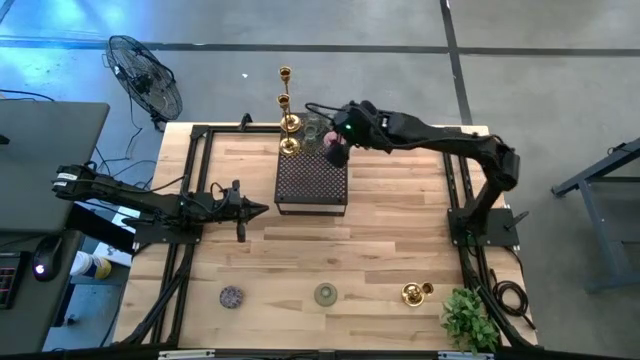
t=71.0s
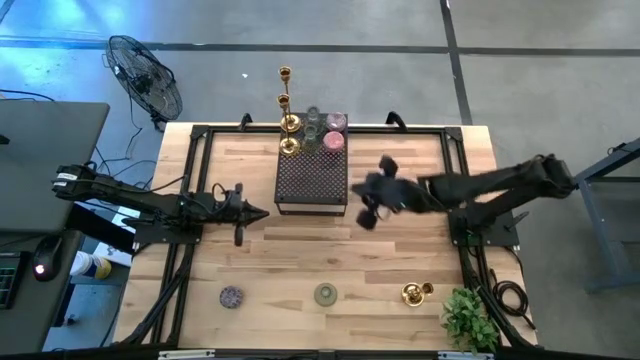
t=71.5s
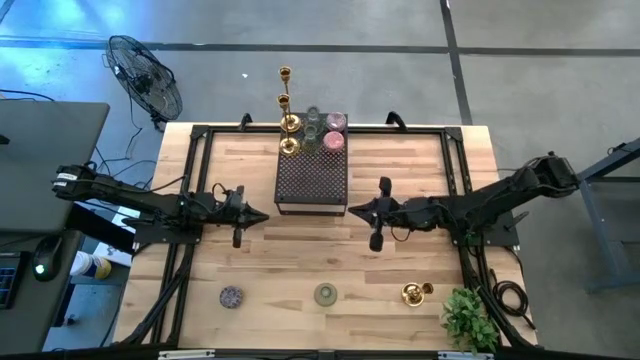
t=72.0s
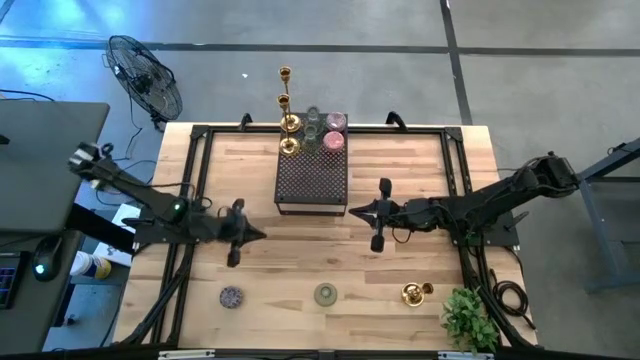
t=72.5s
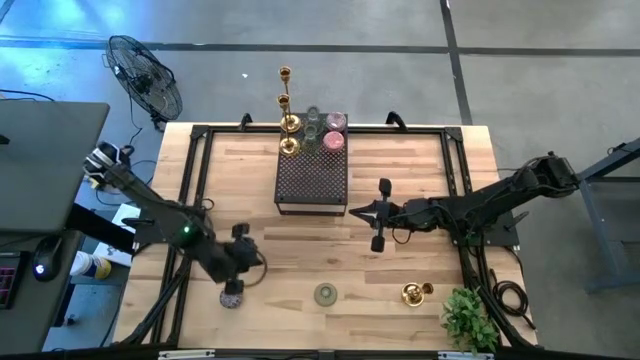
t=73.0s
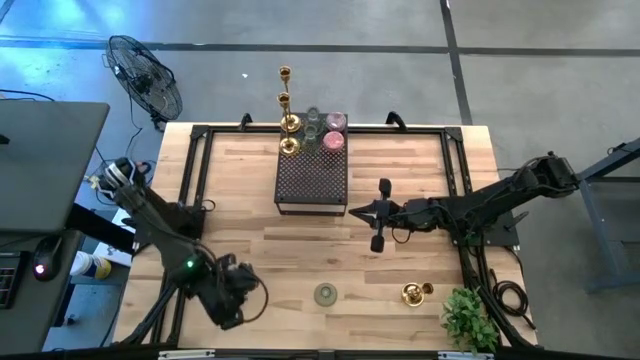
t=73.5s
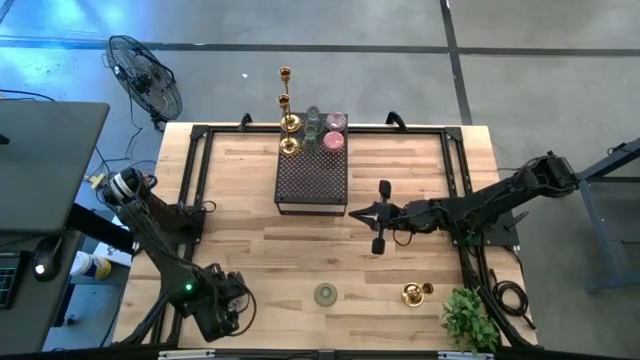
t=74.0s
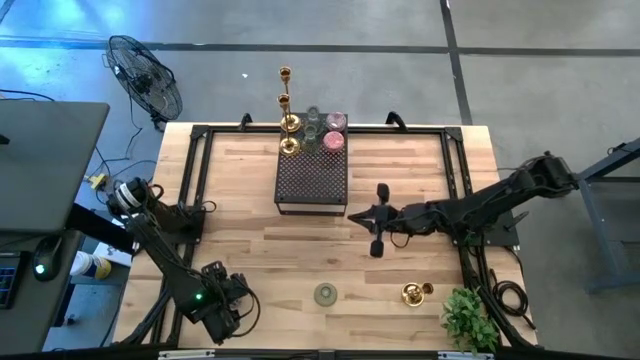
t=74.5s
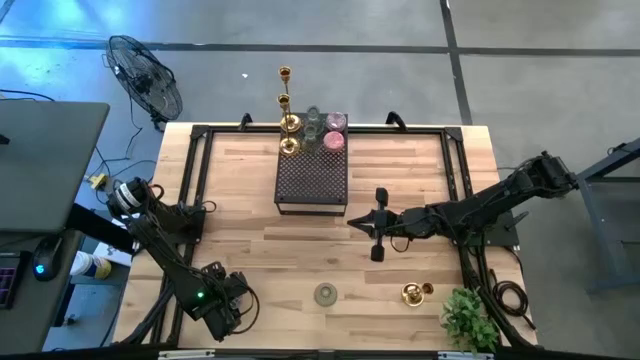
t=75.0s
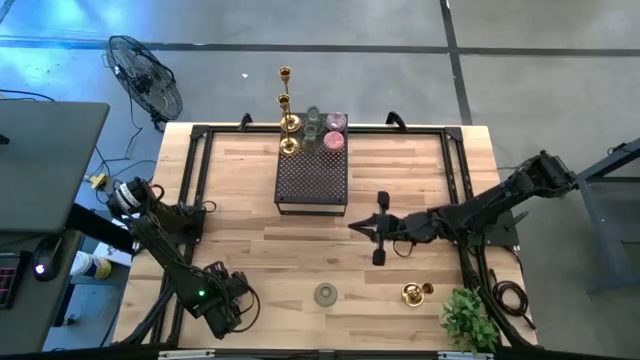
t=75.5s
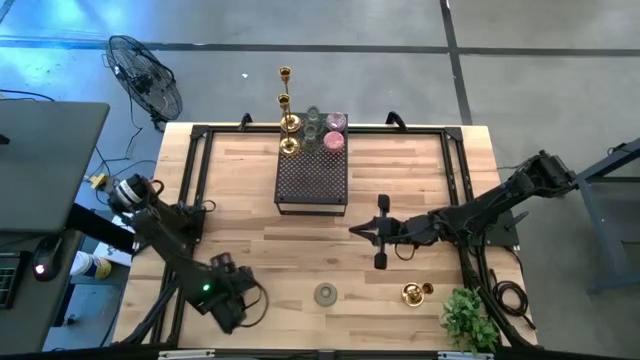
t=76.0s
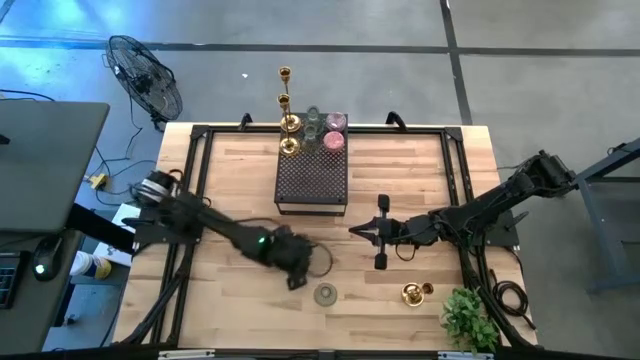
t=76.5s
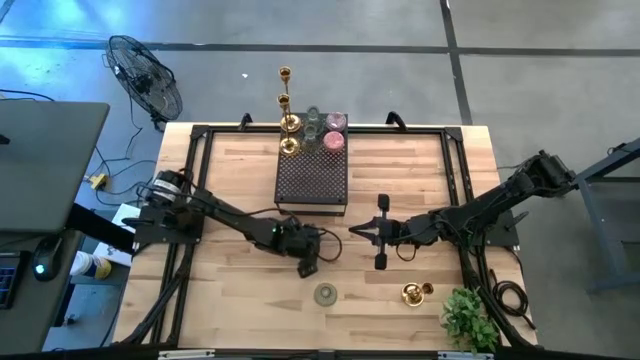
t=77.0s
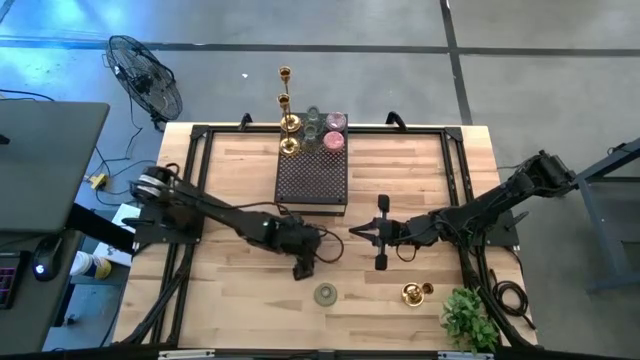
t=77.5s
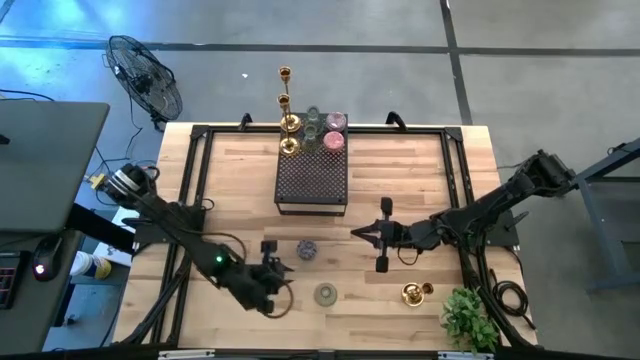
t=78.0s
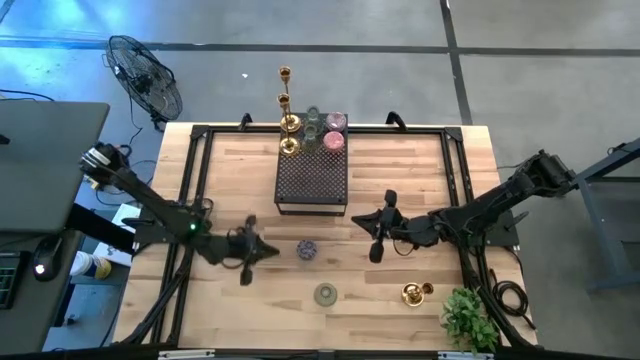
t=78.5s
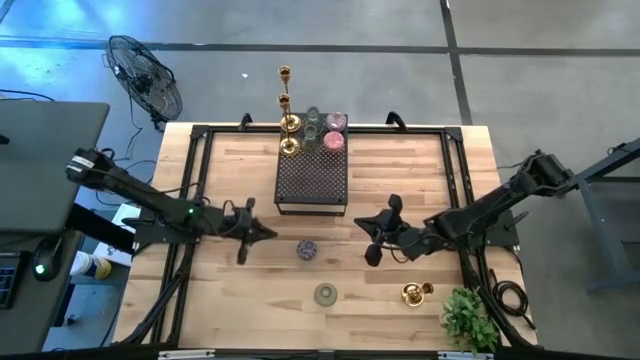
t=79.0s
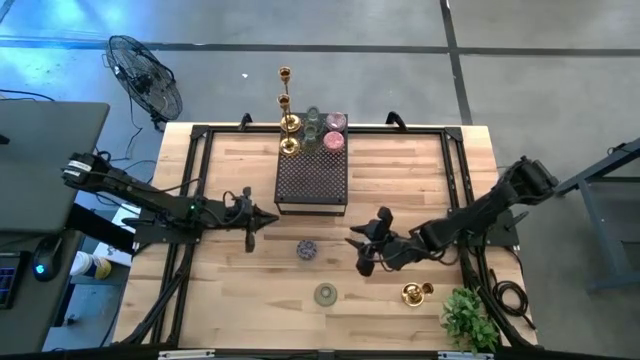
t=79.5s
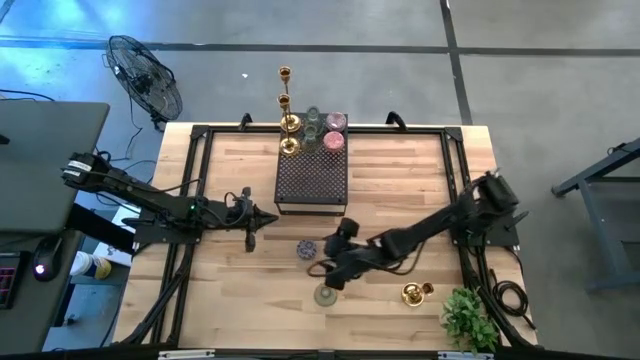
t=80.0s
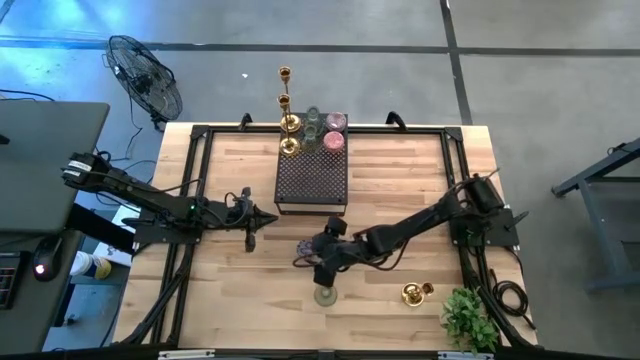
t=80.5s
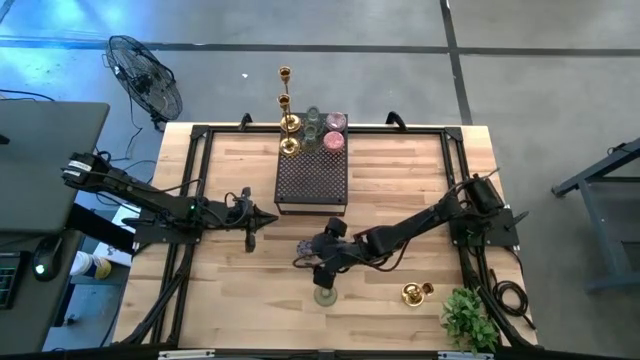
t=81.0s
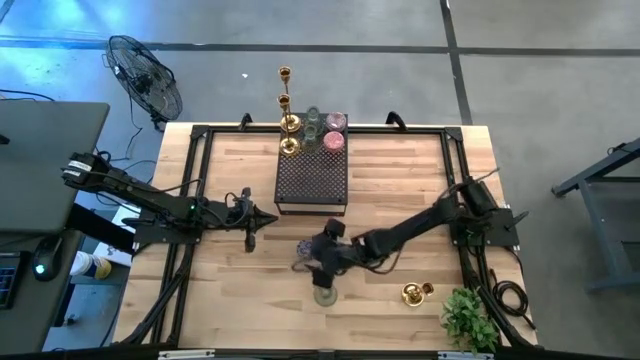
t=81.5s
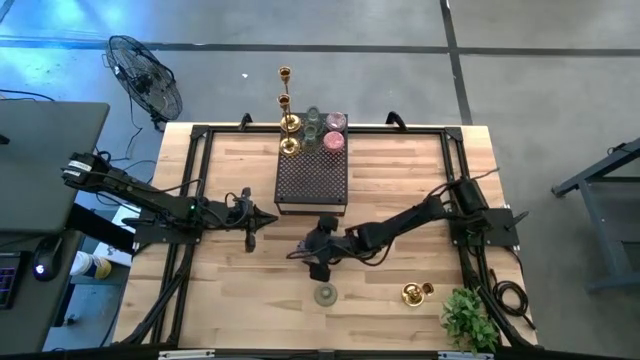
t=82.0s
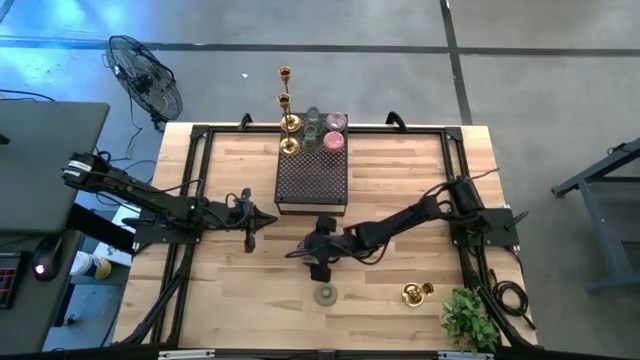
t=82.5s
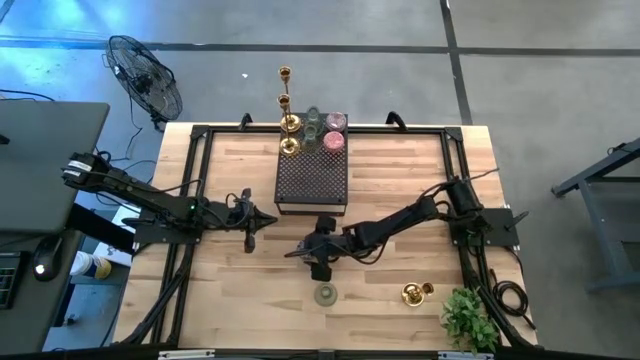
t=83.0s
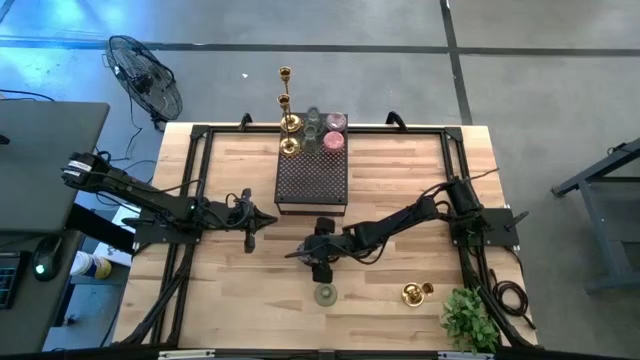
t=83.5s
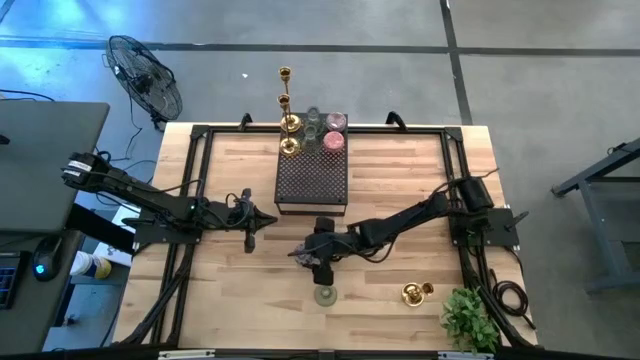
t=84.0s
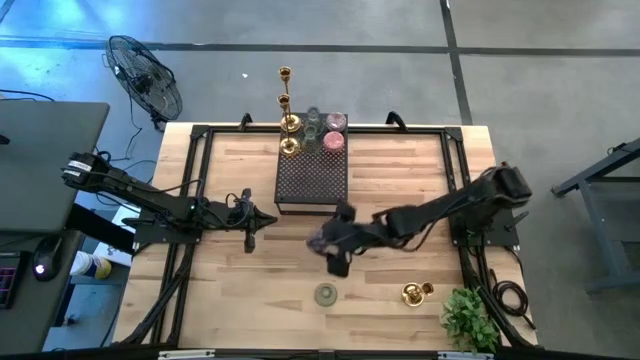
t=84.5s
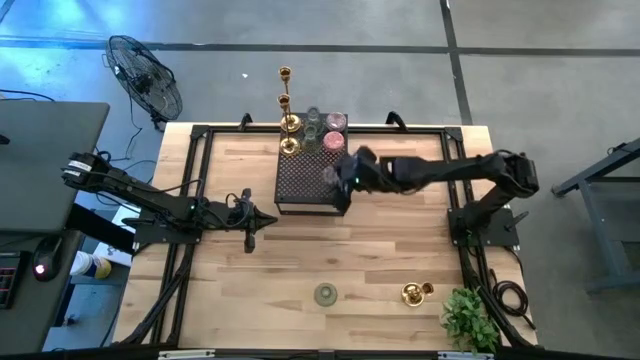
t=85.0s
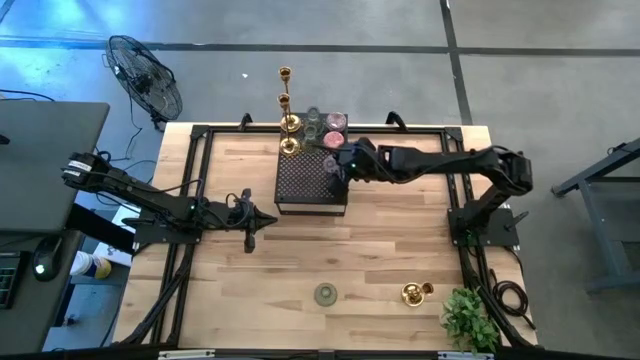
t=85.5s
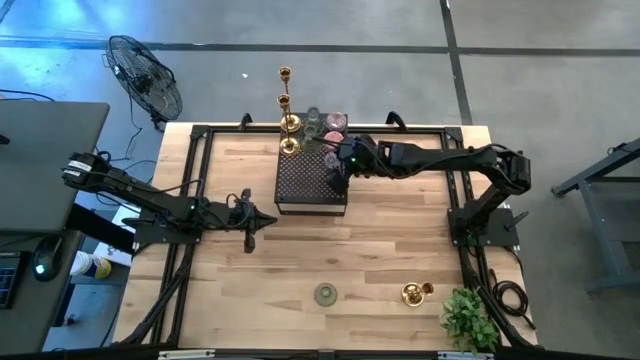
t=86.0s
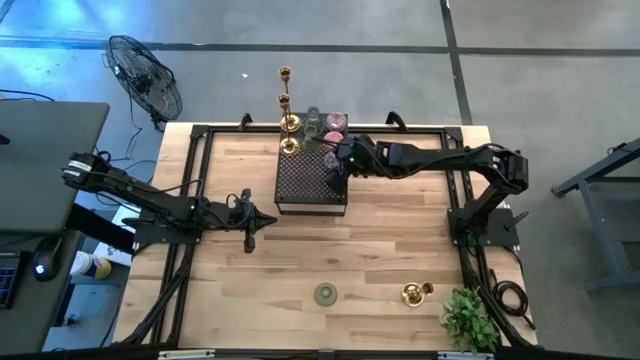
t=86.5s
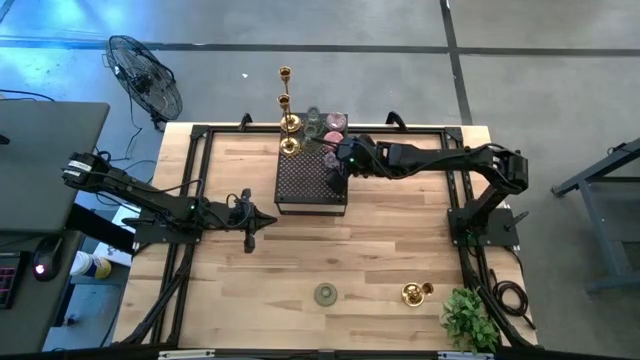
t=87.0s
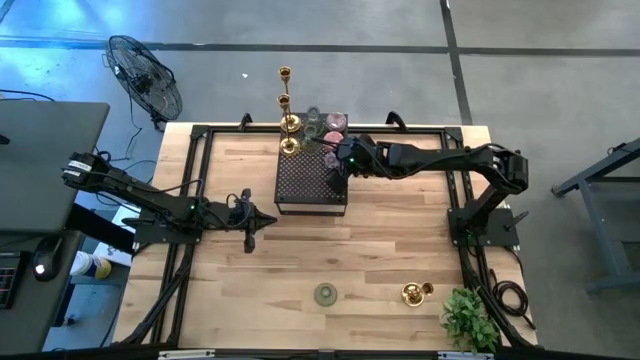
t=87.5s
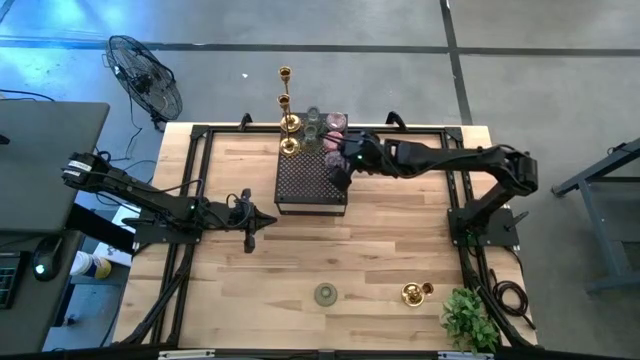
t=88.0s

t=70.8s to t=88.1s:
Task: Pick & Place candle stick holders
Put the white patterned scented candle on the shelf

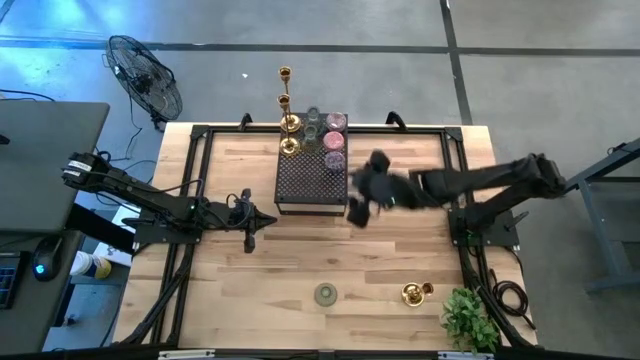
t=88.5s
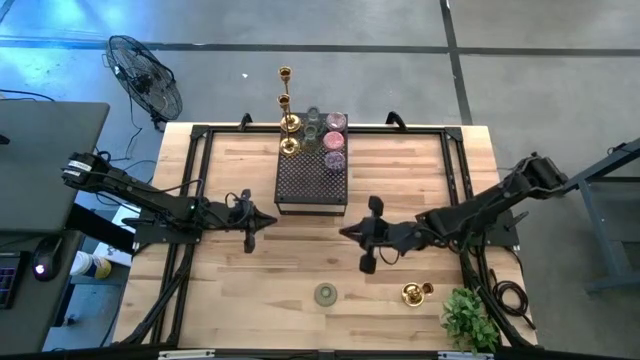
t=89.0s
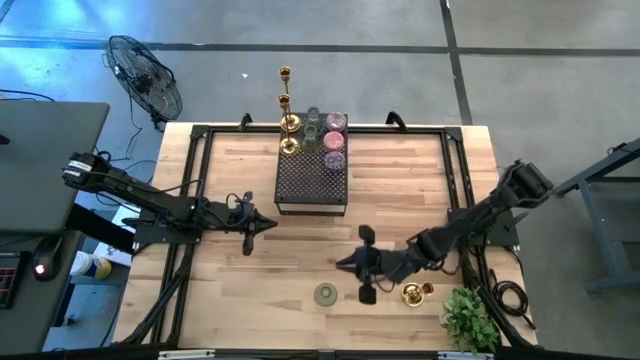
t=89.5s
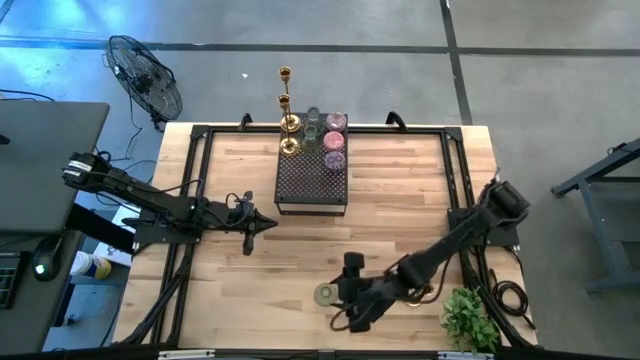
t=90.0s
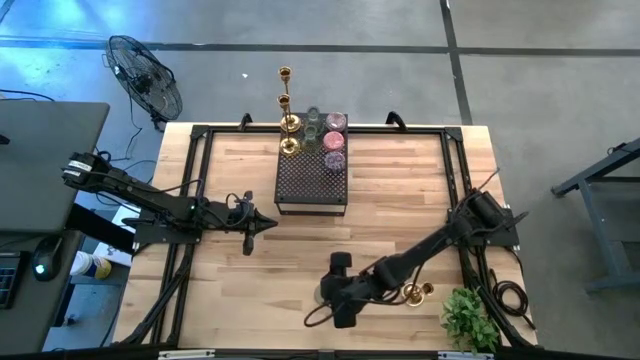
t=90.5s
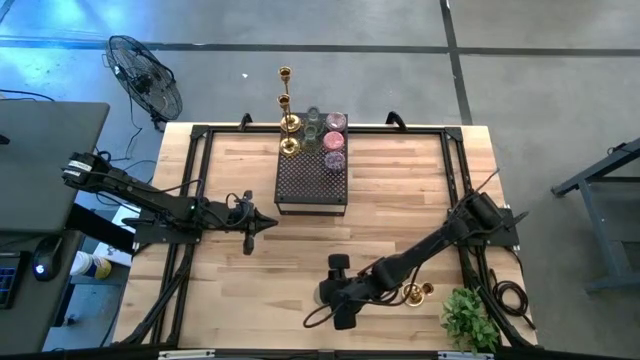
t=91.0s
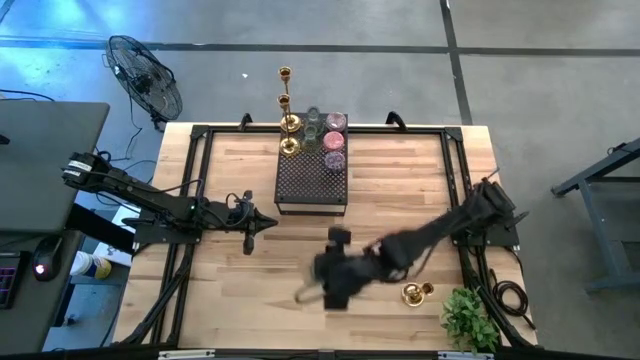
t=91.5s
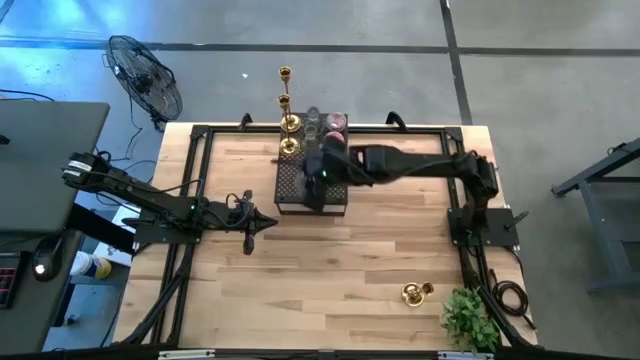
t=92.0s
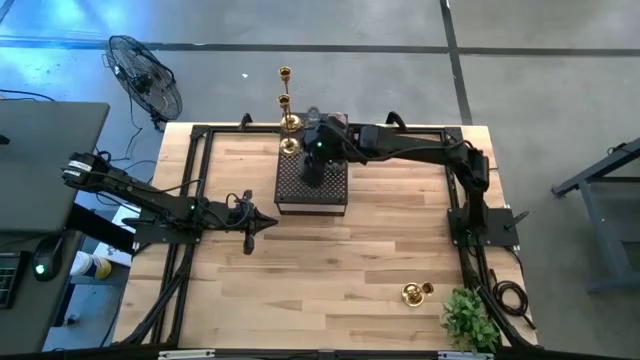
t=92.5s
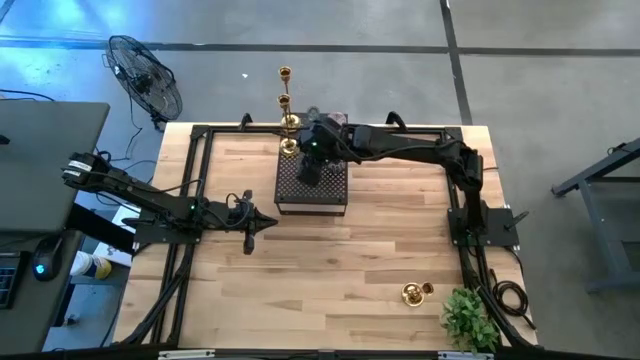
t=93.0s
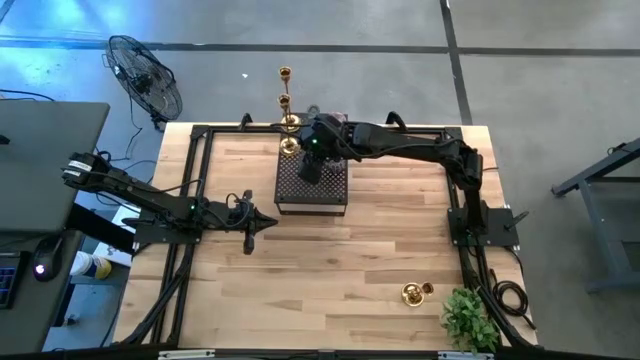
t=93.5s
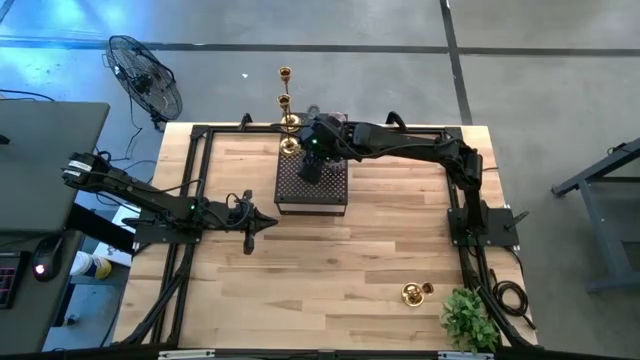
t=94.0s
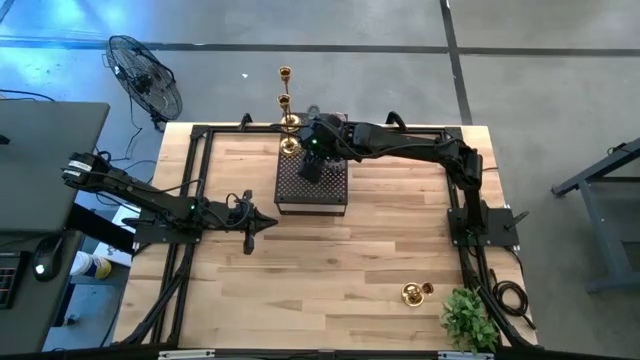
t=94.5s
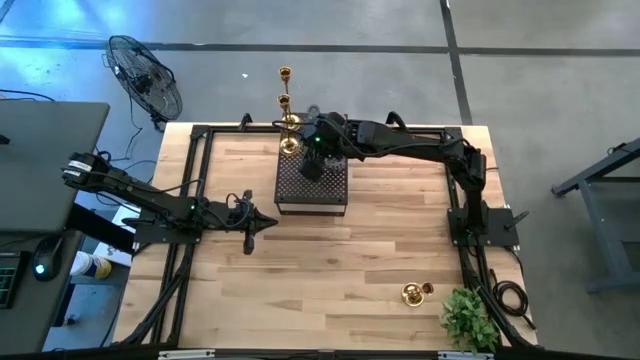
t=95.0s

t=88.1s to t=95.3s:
Put the green candle holder on the shelf
